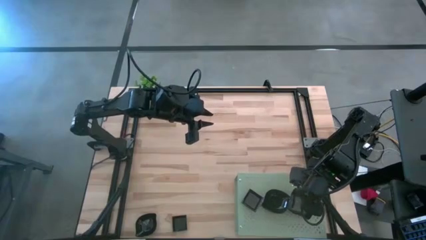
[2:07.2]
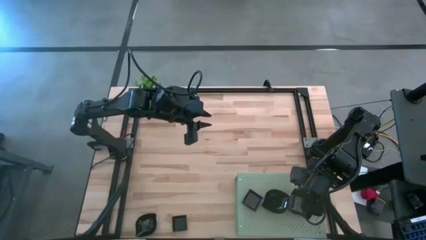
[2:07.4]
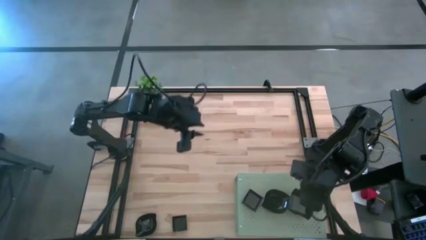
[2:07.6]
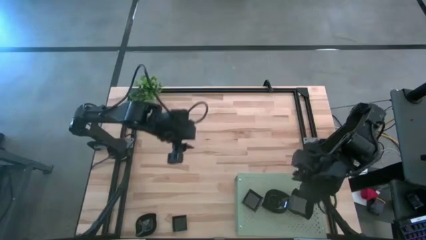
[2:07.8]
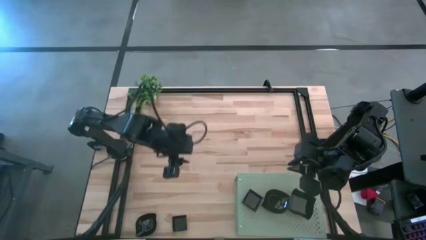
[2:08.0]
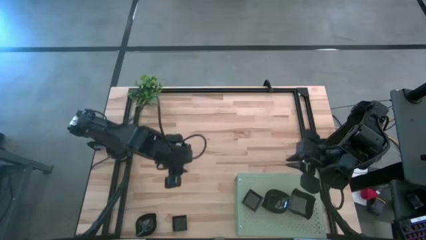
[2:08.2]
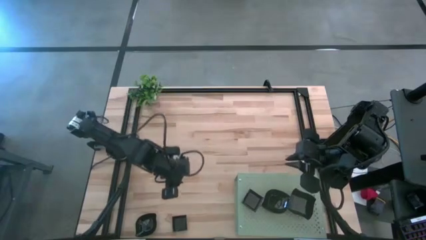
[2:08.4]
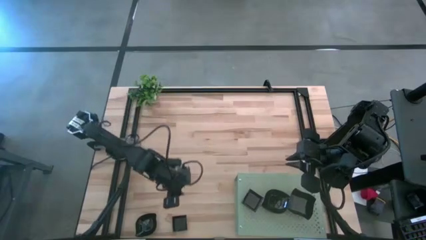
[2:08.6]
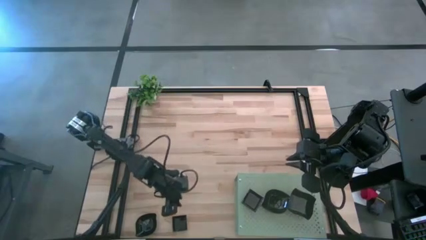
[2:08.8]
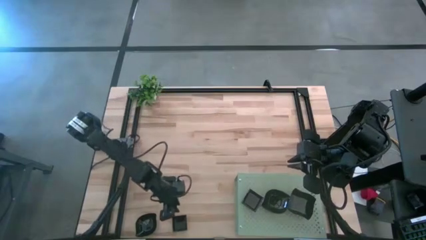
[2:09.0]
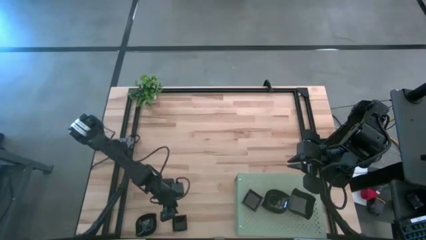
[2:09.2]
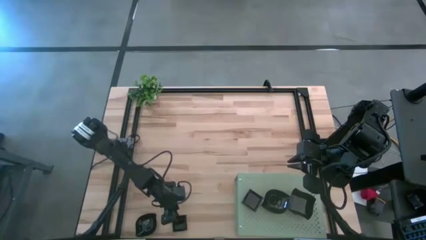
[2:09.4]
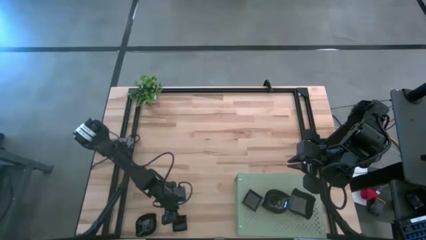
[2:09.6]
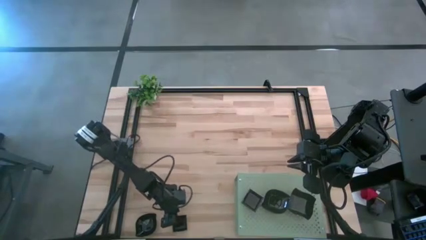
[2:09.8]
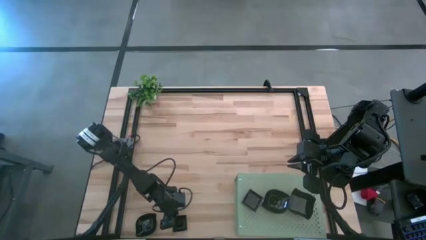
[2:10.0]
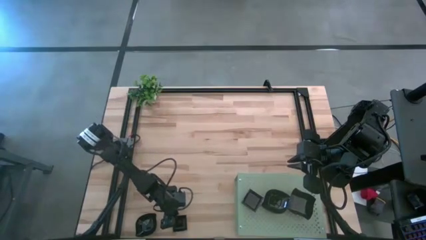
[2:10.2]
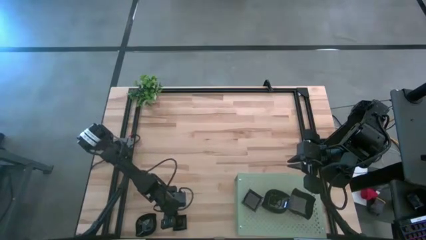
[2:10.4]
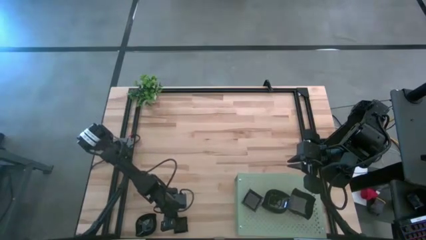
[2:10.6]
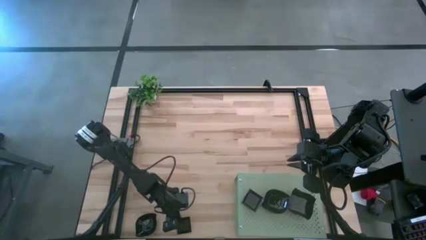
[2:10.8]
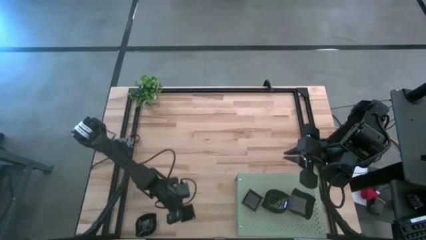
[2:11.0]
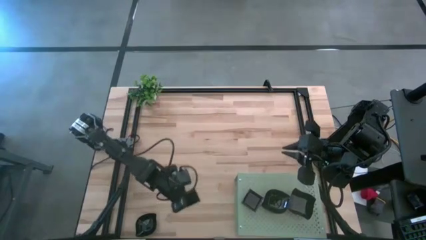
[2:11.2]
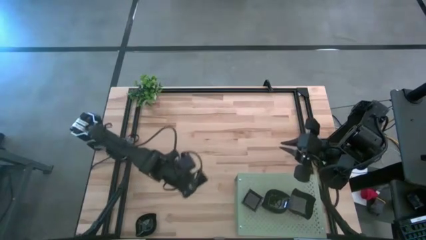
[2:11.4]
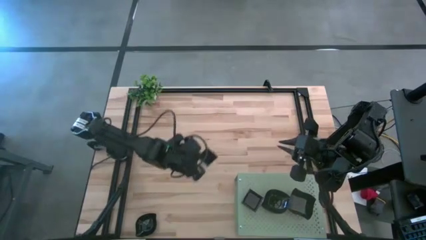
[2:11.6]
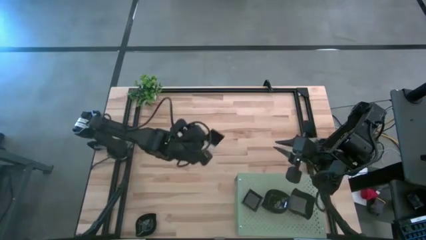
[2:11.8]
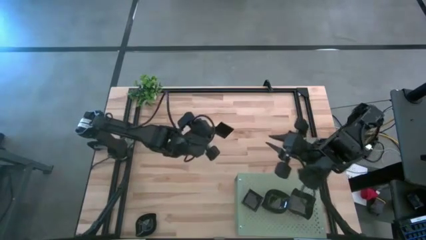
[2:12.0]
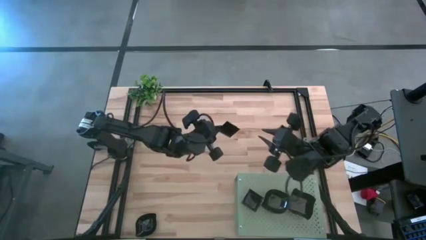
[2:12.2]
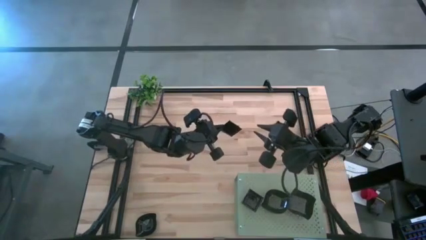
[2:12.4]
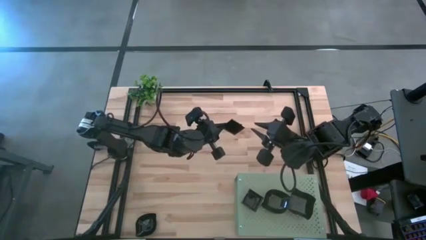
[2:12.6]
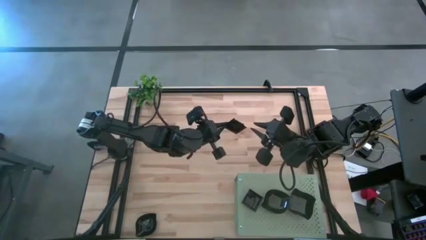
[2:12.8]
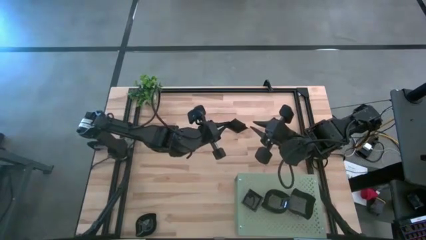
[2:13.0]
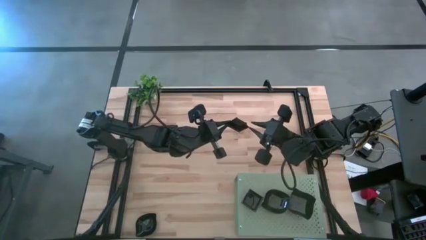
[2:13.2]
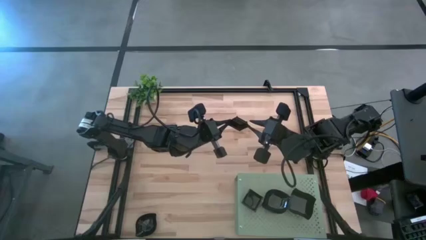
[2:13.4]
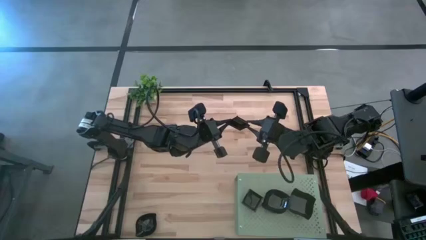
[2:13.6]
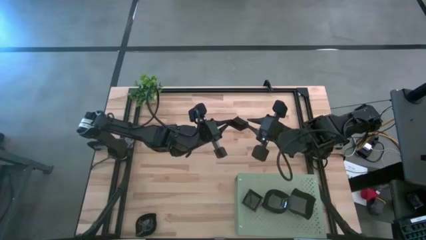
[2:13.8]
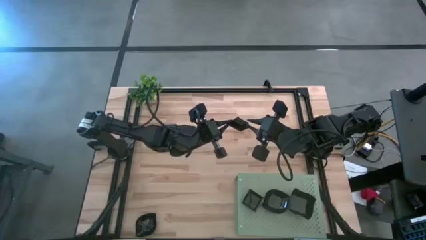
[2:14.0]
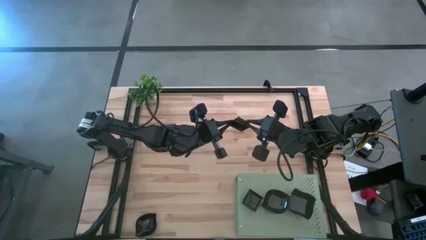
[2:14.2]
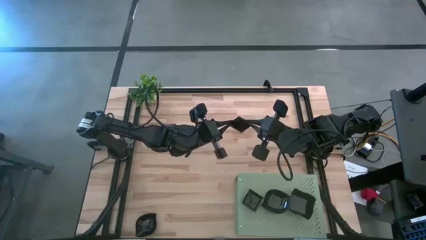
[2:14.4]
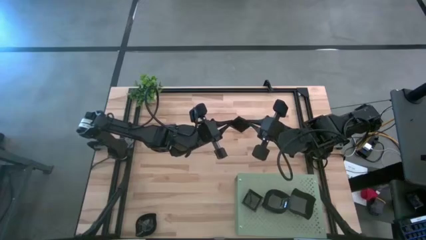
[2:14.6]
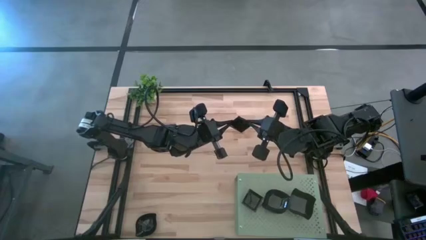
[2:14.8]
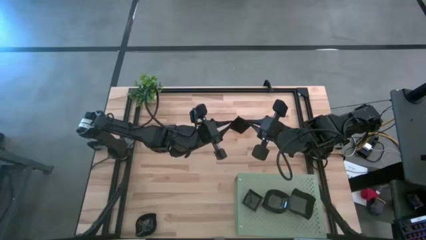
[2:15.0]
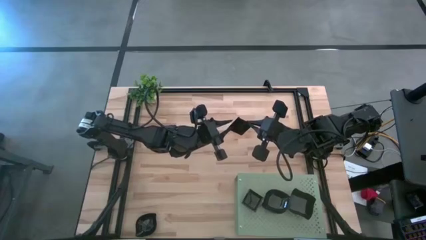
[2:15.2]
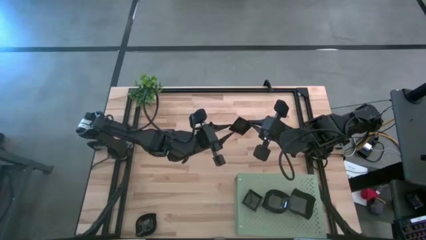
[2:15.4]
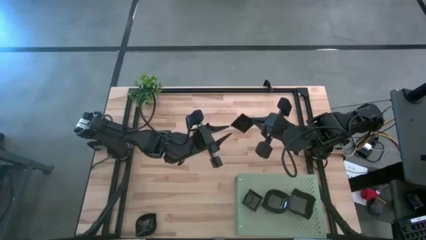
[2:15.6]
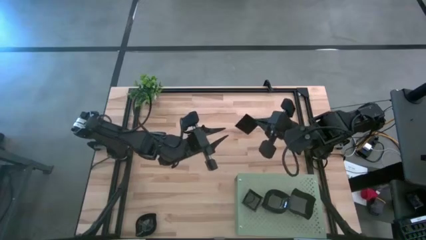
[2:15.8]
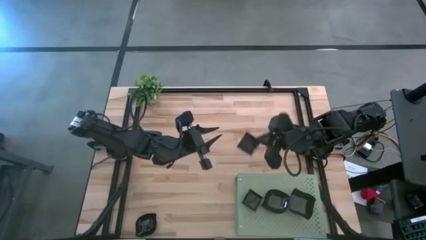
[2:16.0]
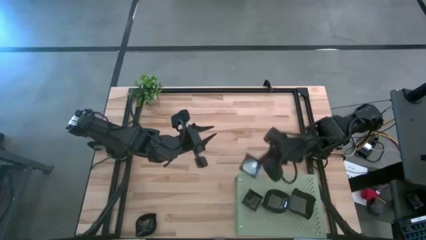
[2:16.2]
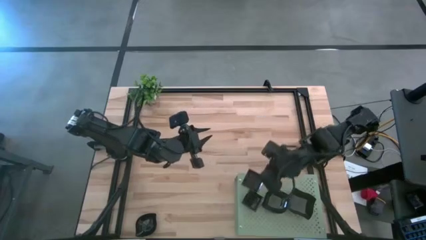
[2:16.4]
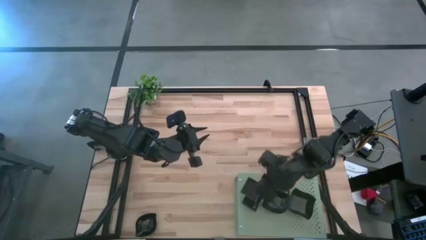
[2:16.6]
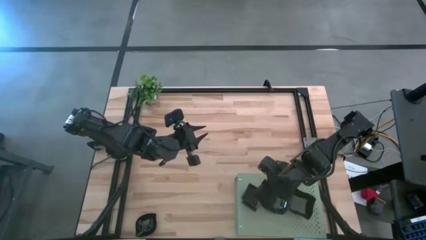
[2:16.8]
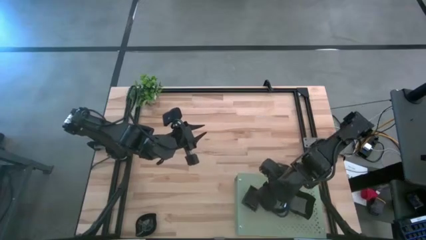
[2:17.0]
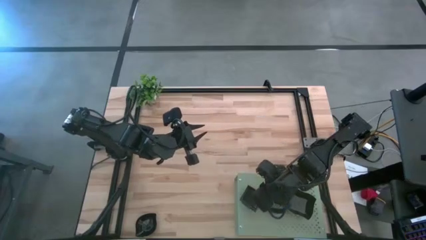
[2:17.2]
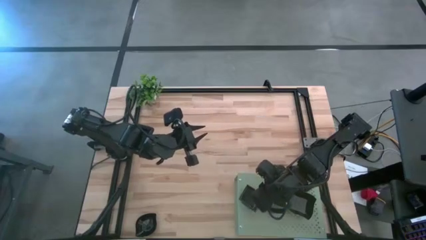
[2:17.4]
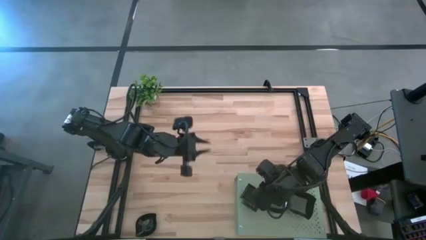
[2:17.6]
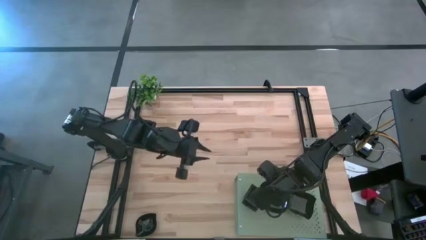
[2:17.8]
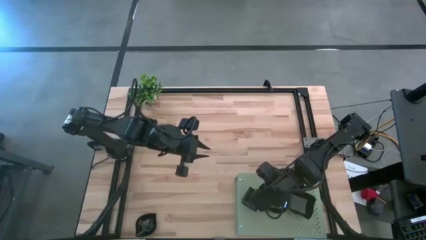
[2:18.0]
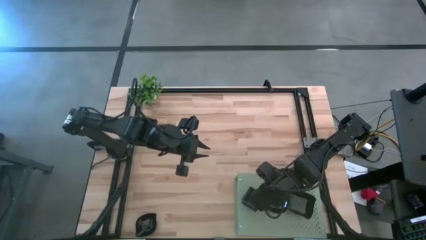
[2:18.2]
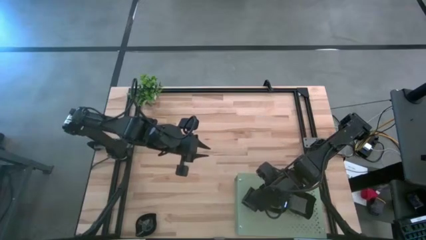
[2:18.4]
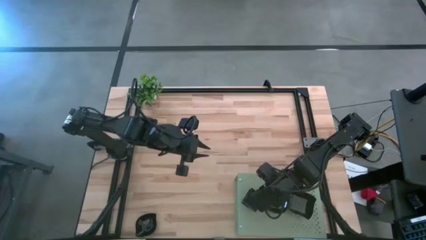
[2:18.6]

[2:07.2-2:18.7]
Task: Pick & Place Mini shaped plates
Stack the square plate on the square plates on the shelf
